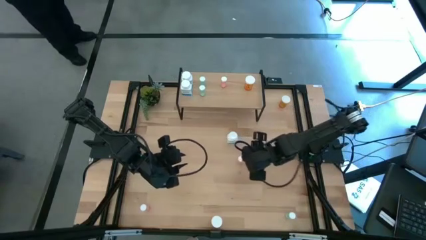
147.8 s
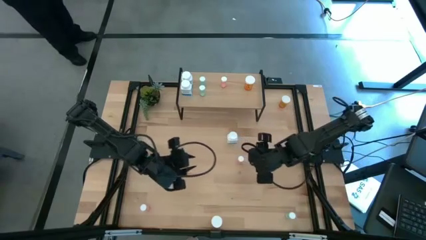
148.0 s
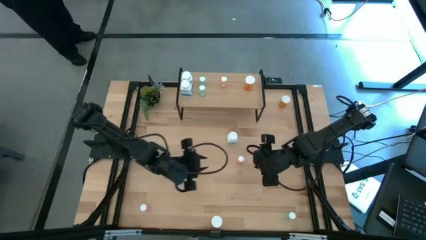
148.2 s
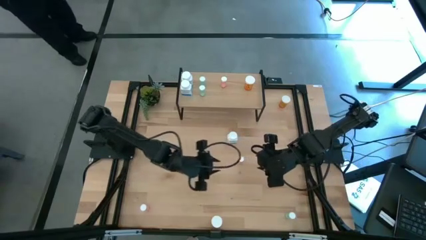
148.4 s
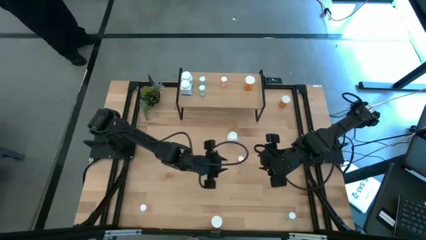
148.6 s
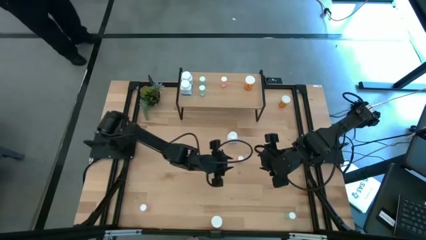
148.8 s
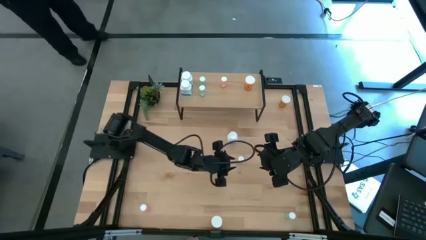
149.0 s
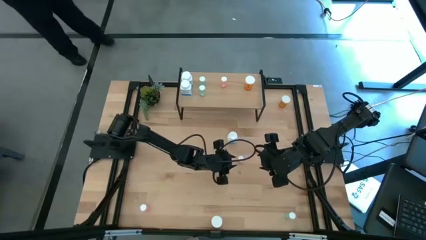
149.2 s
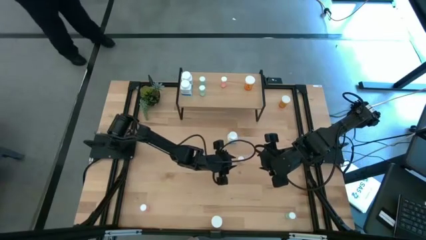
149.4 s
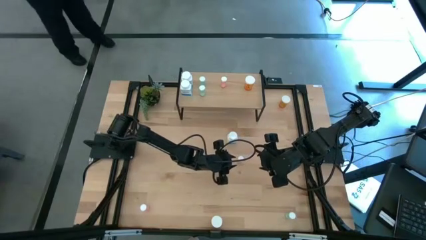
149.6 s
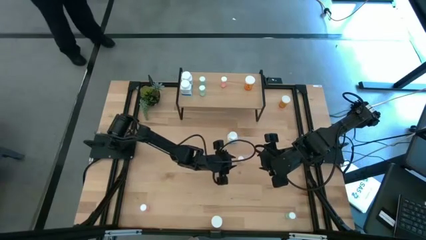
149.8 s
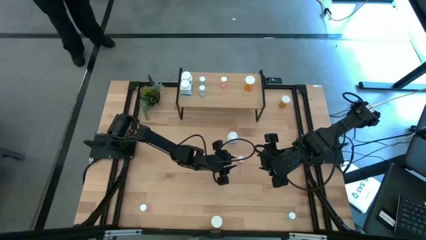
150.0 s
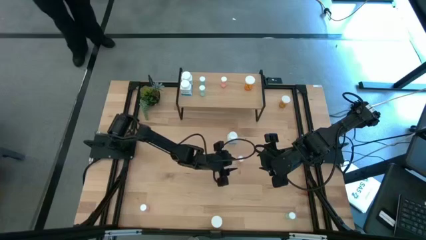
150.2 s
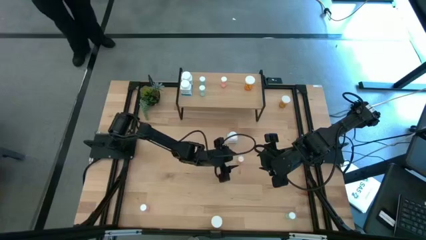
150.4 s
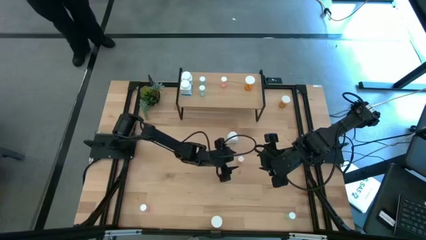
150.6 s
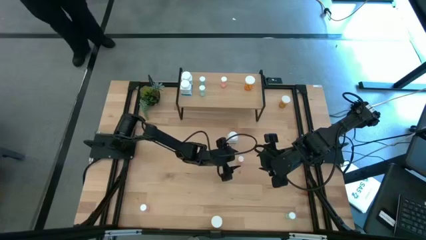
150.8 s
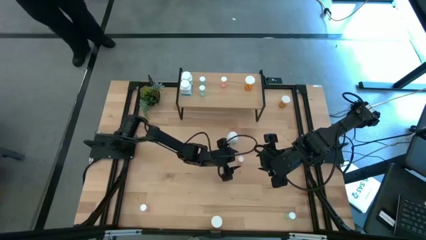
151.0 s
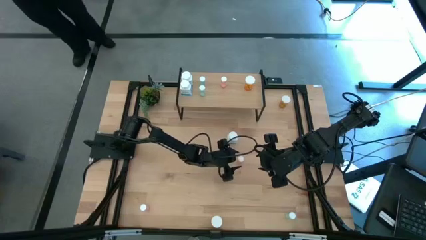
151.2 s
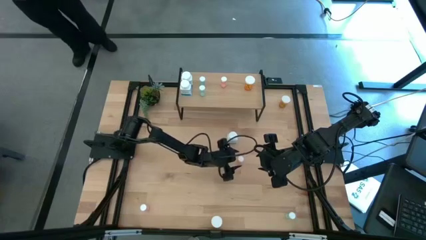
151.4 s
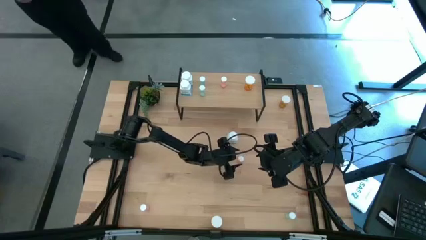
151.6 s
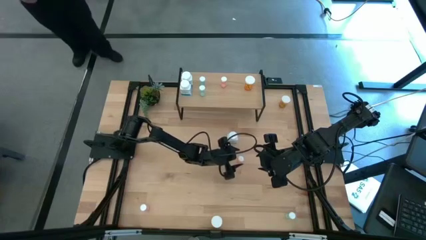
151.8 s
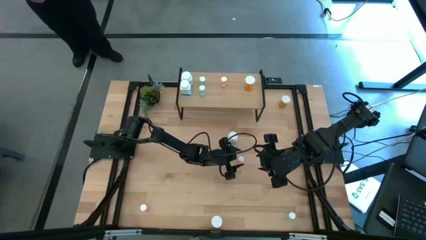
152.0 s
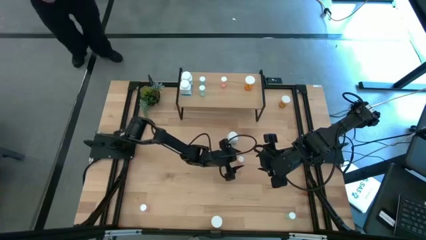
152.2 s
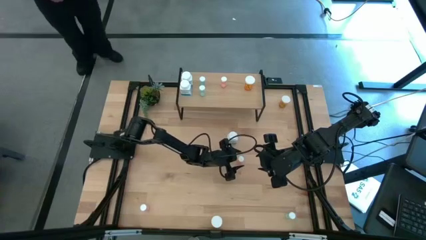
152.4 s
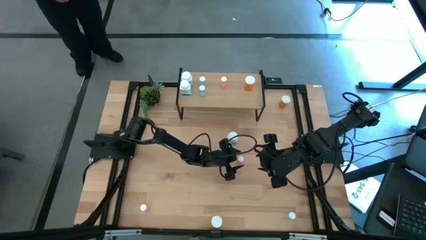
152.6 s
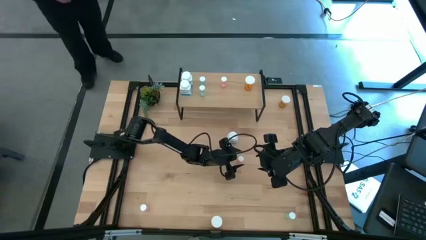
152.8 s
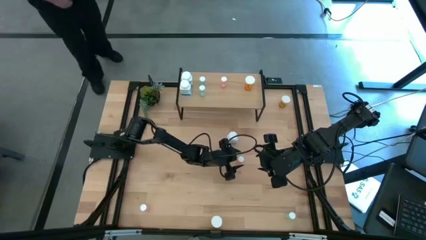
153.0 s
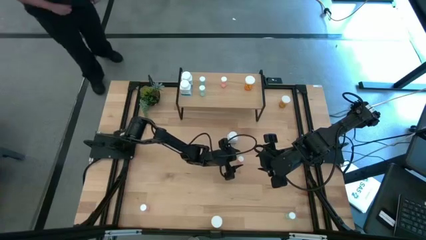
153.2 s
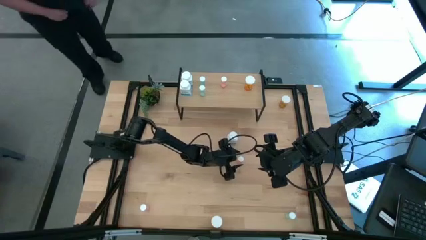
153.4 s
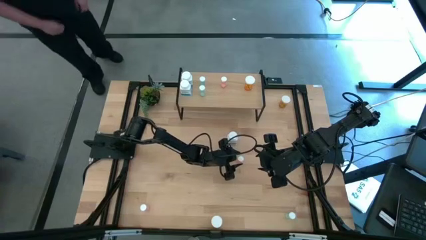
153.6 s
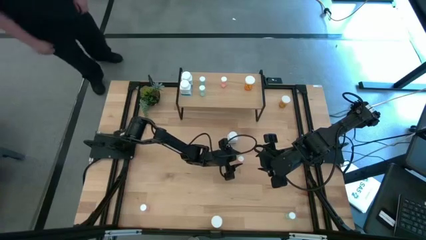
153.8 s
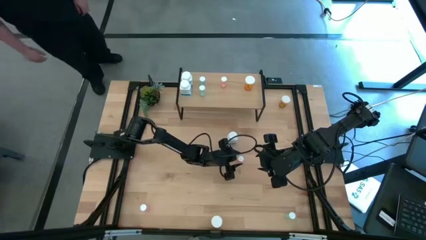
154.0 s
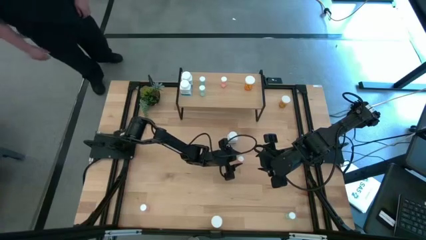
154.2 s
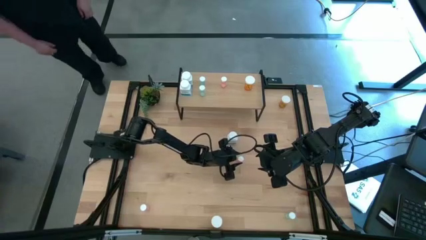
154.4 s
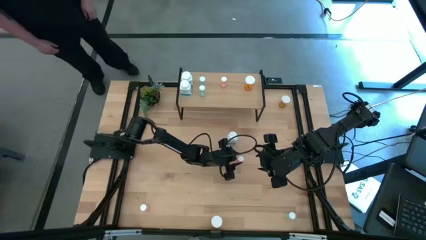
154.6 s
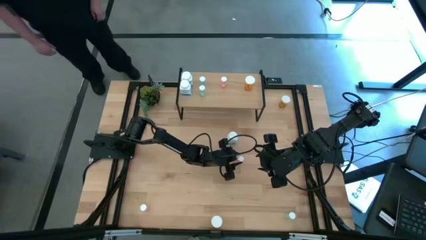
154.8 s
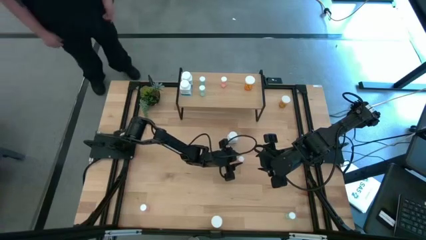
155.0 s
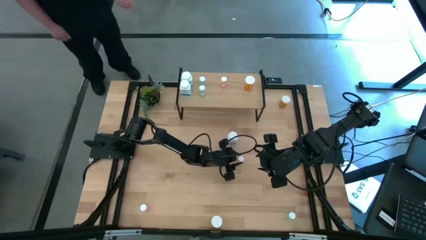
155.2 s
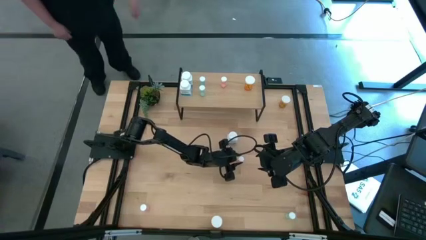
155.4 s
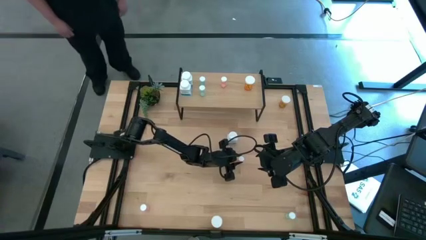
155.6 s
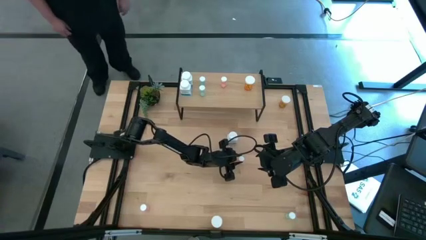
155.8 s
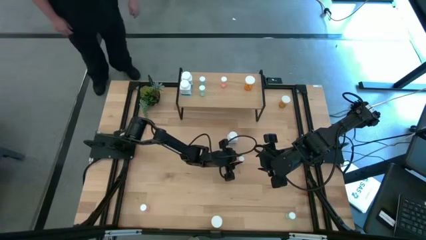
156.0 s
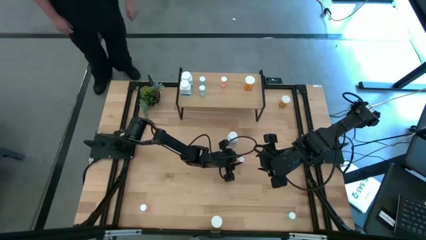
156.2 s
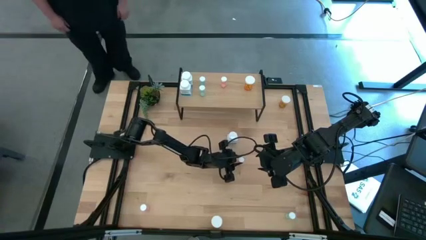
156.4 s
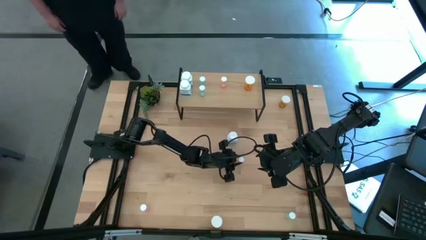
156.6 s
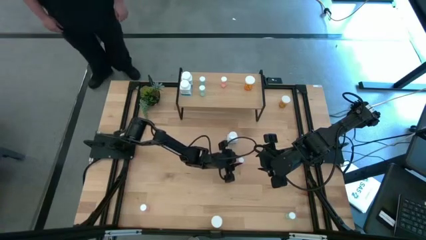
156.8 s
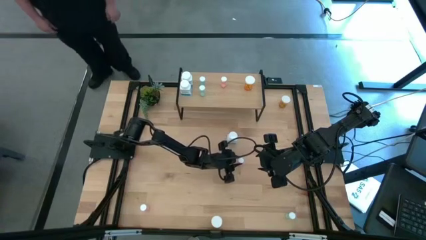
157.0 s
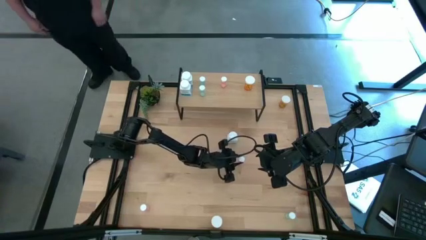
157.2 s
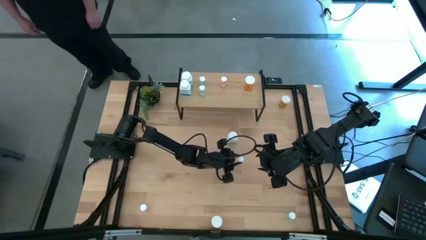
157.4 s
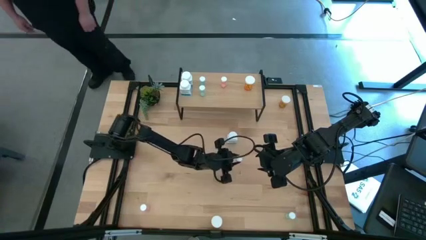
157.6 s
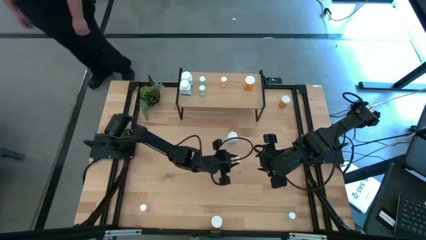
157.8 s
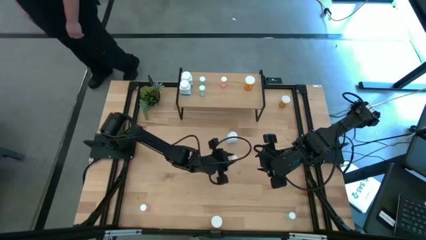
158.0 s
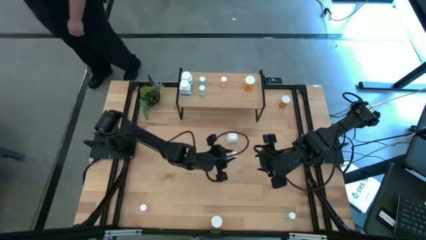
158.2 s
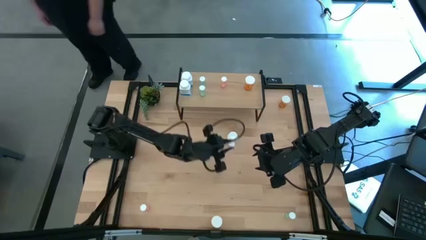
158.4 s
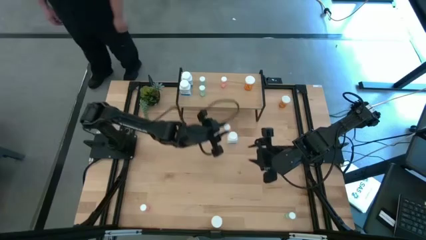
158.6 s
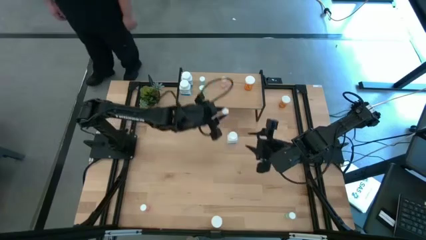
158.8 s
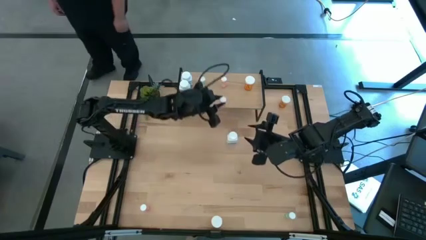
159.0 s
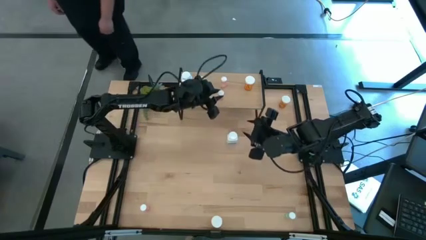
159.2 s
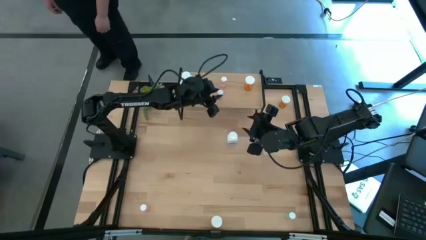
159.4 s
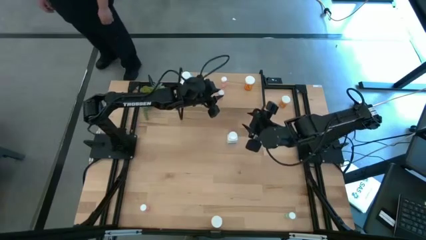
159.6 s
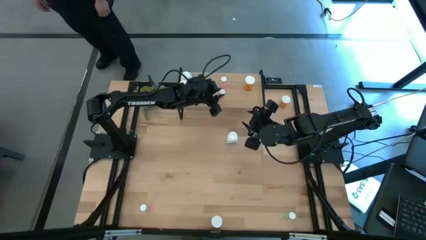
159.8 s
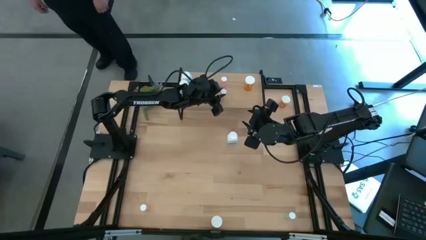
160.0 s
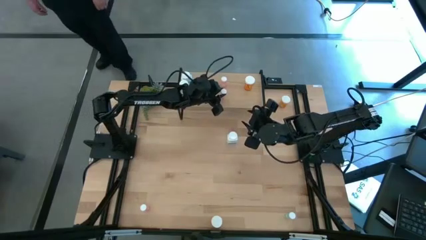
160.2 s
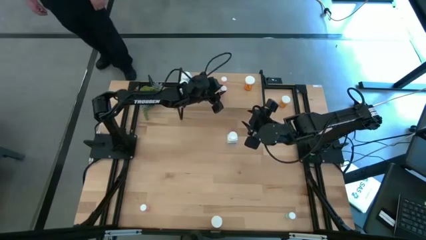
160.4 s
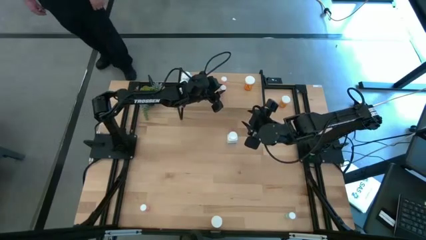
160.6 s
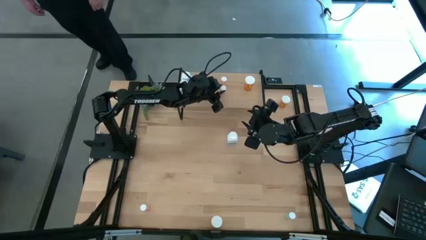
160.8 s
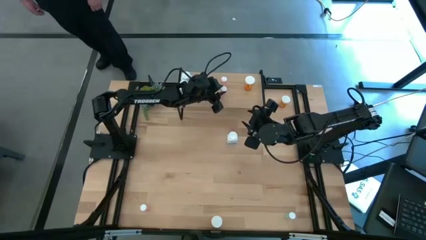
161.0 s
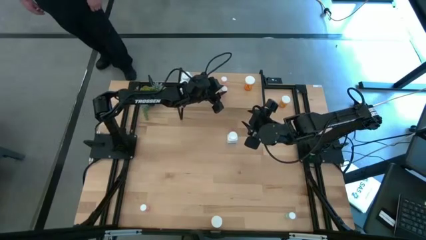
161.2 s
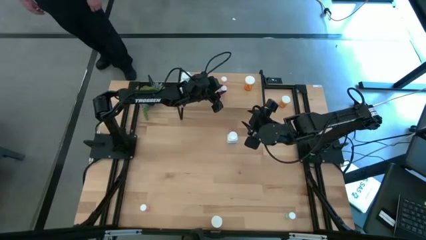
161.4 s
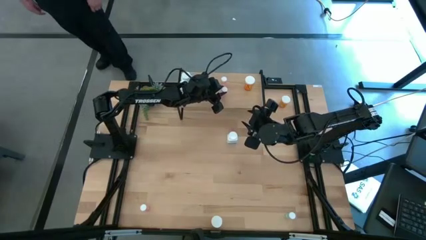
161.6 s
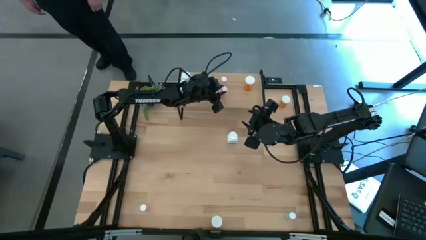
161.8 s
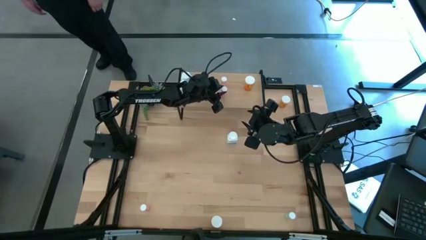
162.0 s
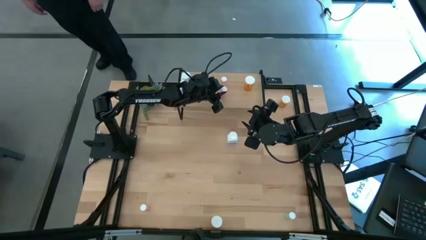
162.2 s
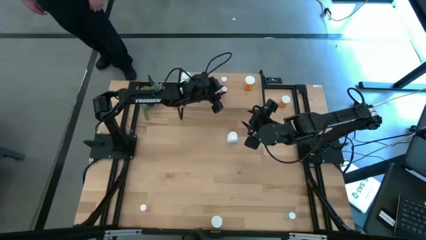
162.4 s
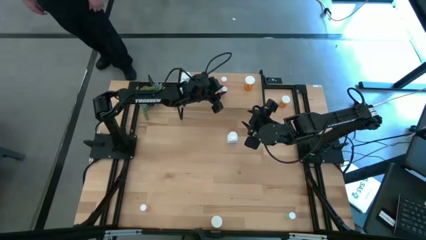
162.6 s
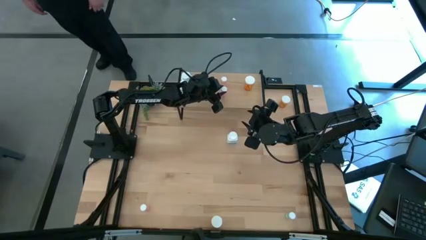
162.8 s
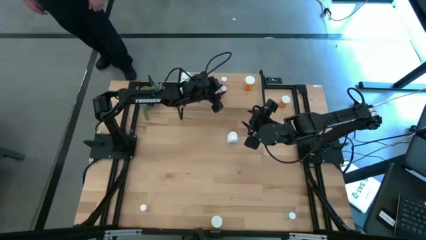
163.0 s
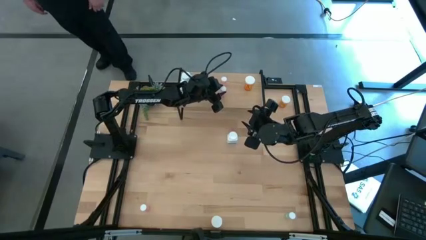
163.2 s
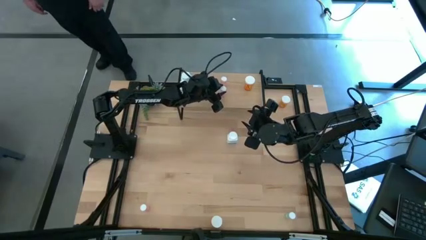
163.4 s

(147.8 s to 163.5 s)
Task: Pick and place medicine bottles onto shelf by color
Put the right pink pill bottle on the shelf aligned with the other pink pill bottle

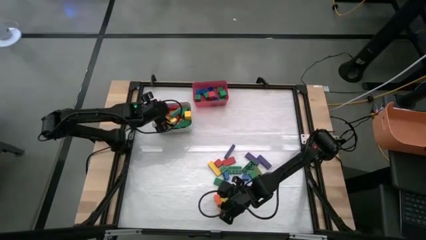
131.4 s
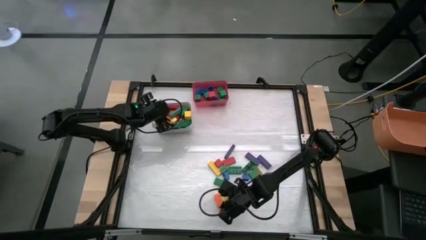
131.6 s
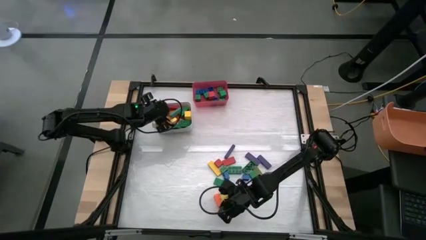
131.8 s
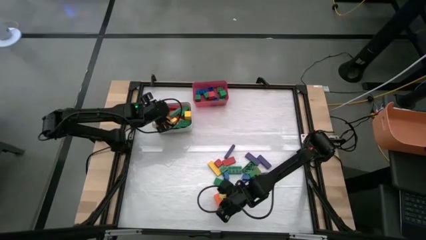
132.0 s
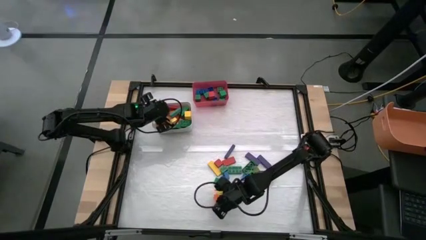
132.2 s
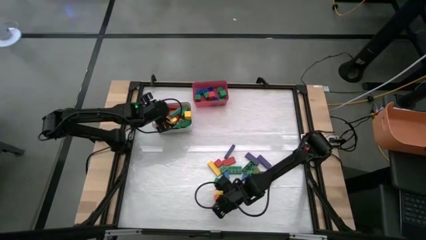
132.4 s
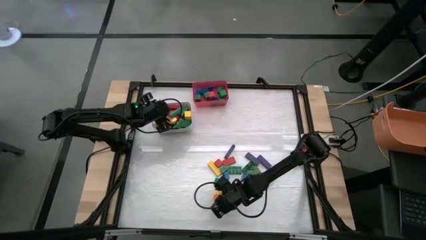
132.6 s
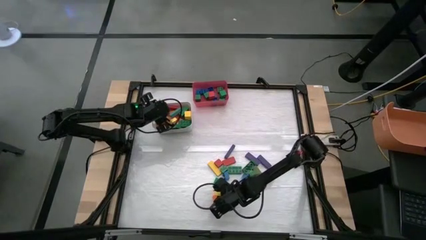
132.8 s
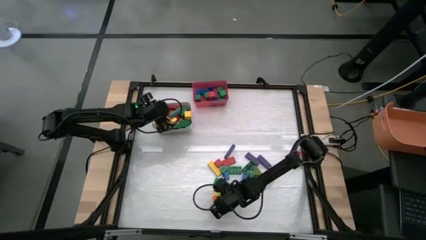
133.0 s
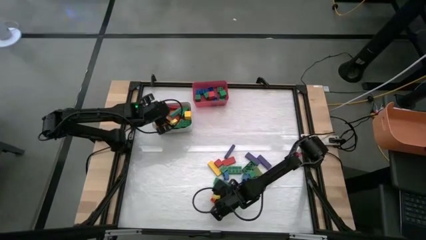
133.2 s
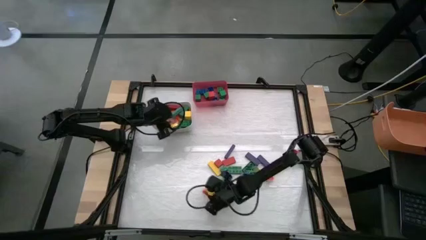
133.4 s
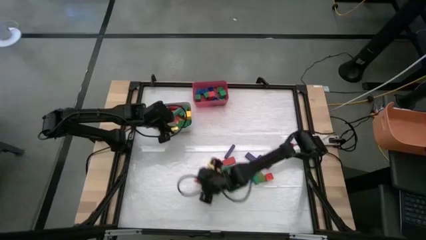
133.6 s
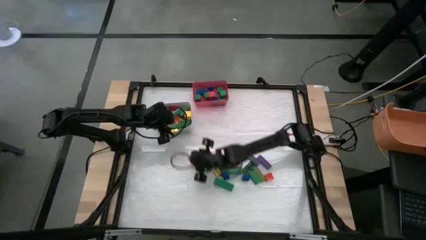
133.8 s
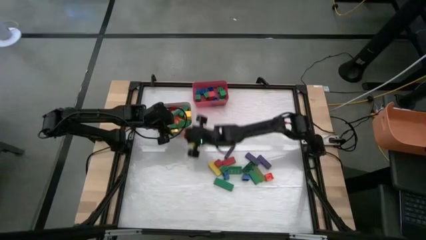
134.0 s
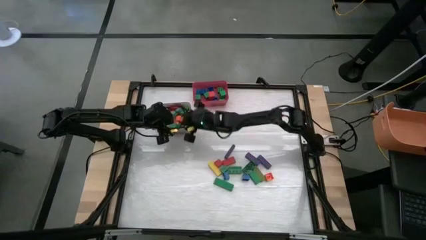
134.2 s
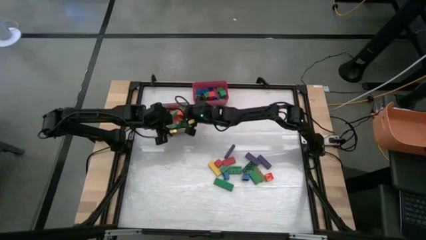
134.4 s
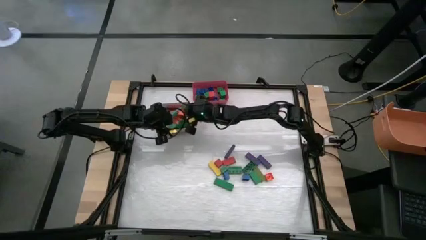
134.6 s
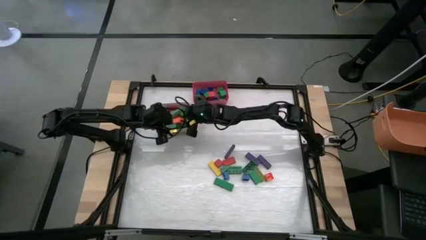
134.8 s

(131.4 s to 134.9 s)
Task: Sort blocks by size
Put the large orange game piece into the white bin
